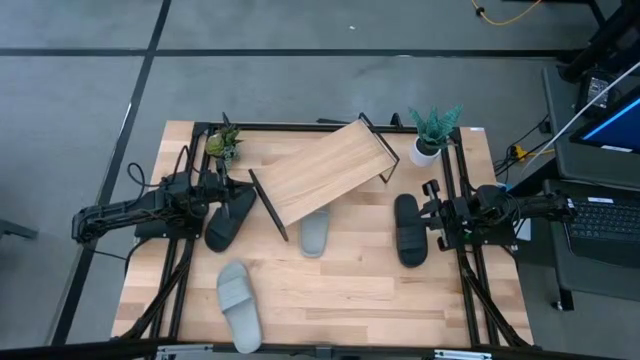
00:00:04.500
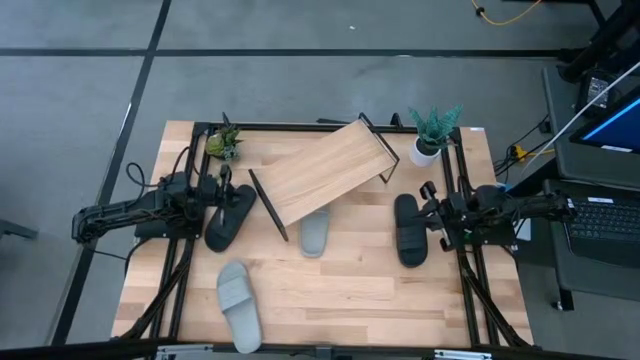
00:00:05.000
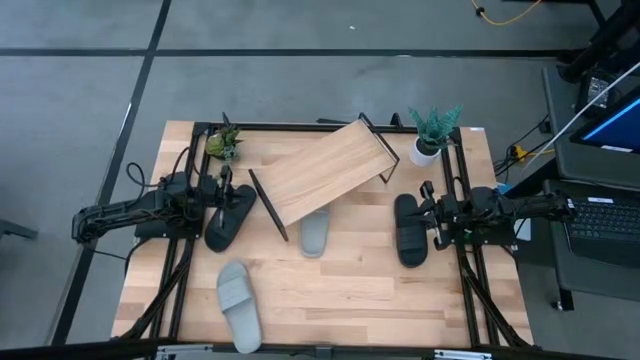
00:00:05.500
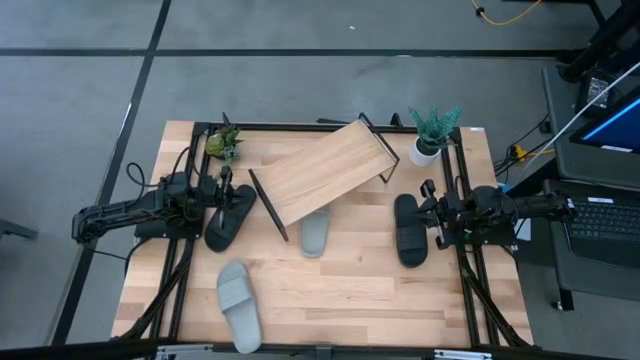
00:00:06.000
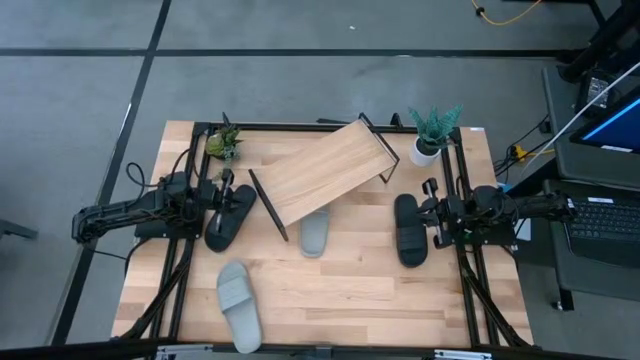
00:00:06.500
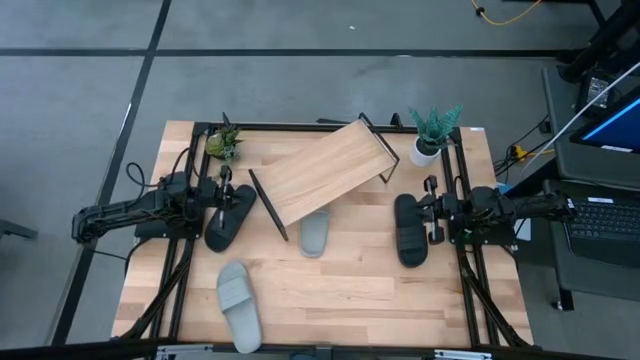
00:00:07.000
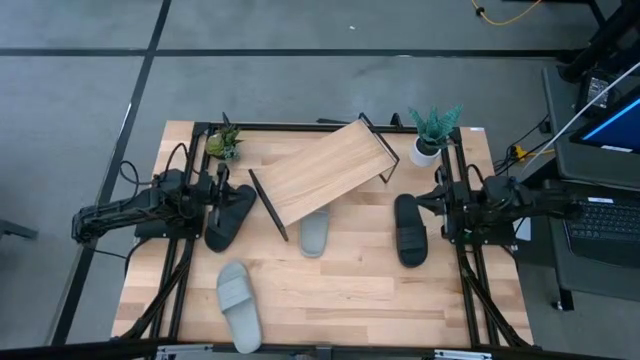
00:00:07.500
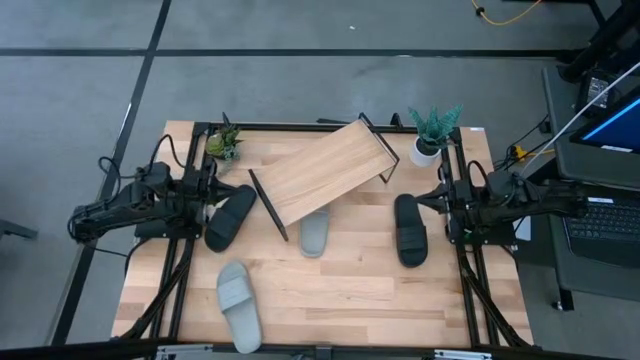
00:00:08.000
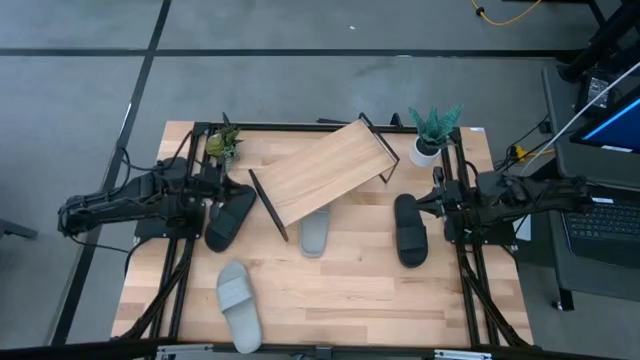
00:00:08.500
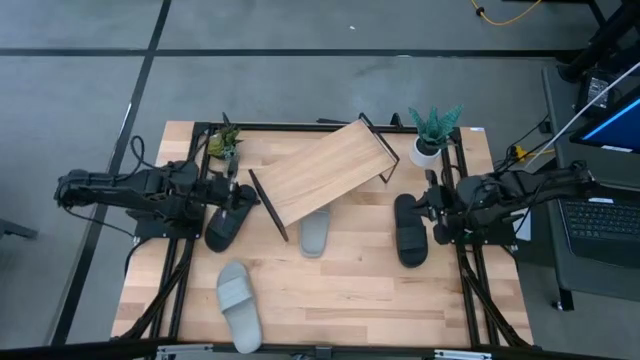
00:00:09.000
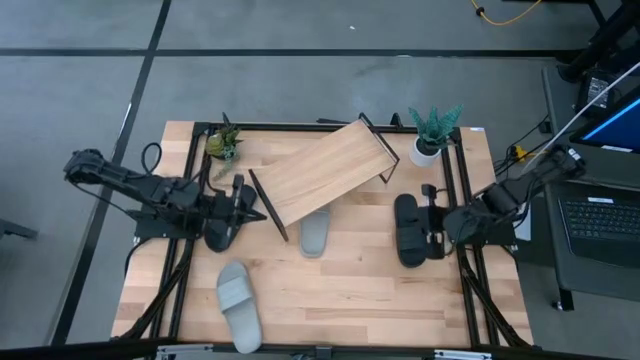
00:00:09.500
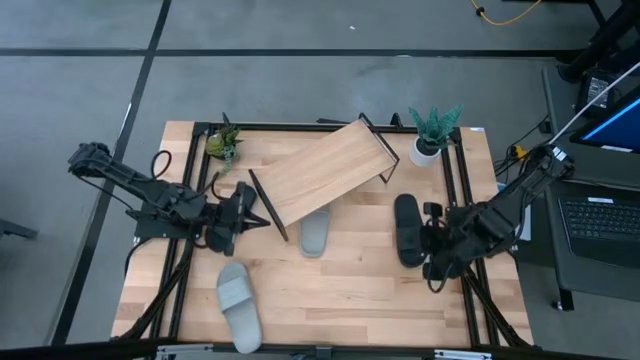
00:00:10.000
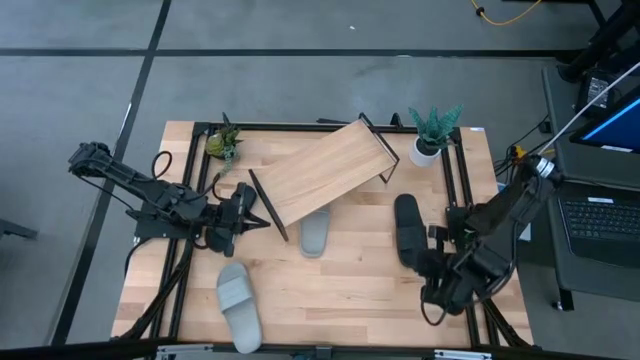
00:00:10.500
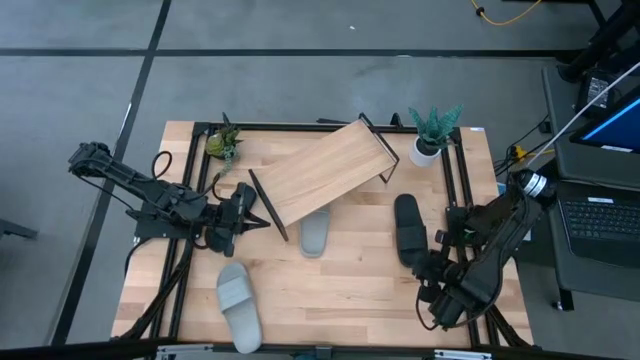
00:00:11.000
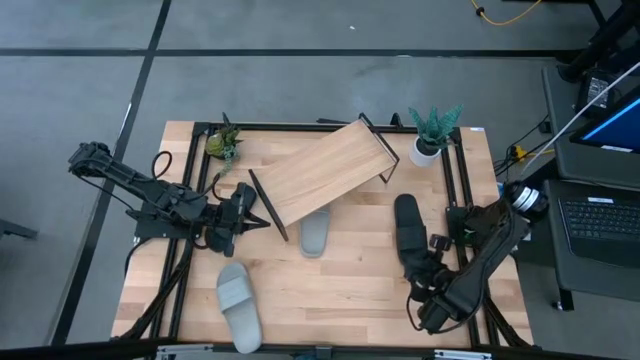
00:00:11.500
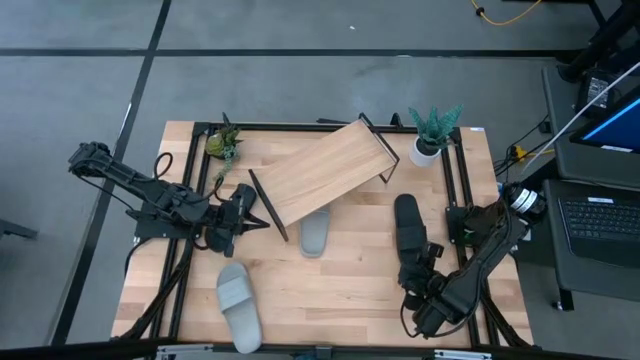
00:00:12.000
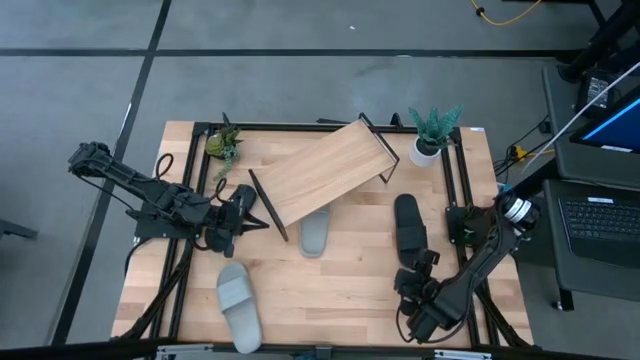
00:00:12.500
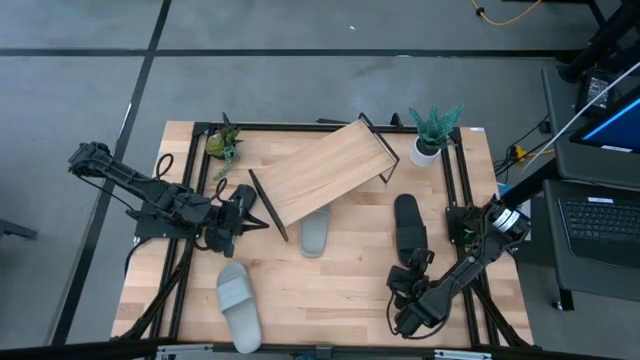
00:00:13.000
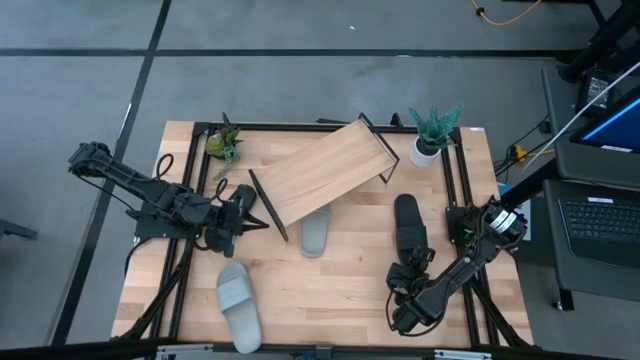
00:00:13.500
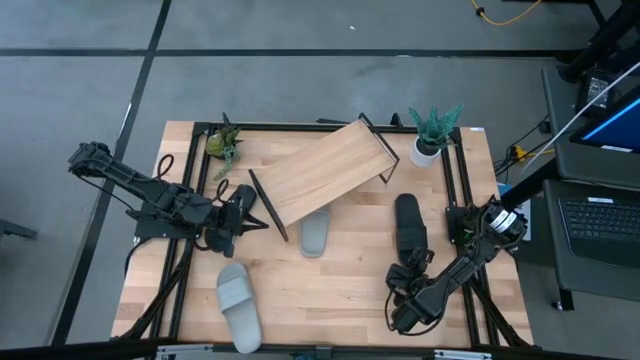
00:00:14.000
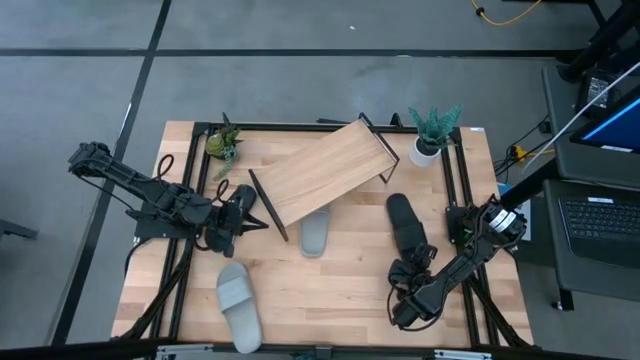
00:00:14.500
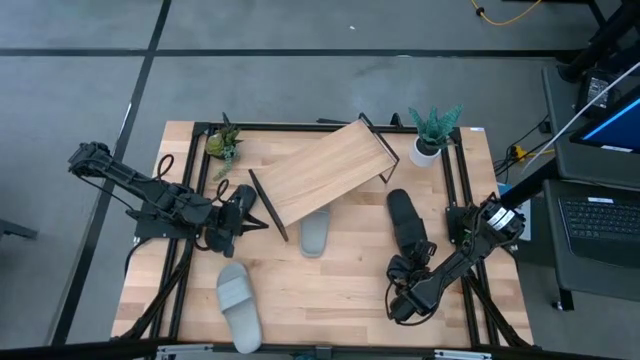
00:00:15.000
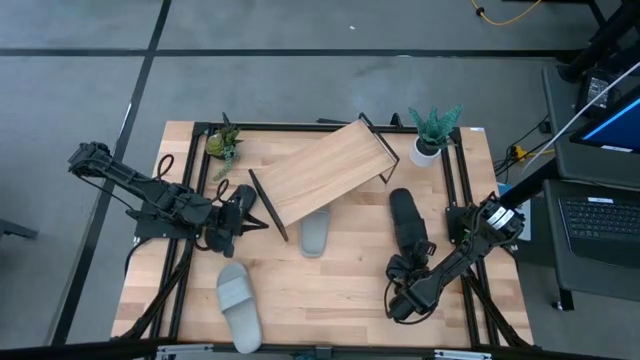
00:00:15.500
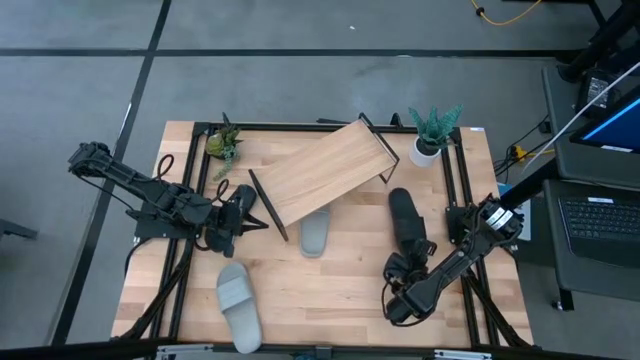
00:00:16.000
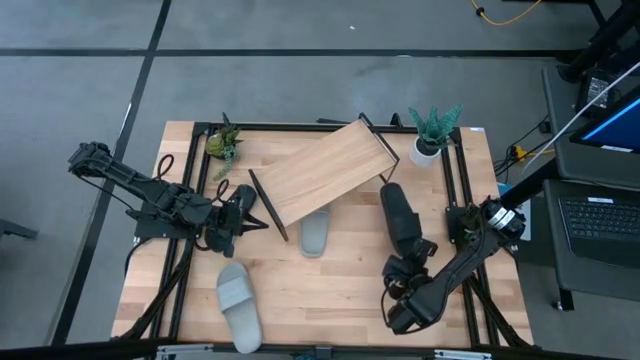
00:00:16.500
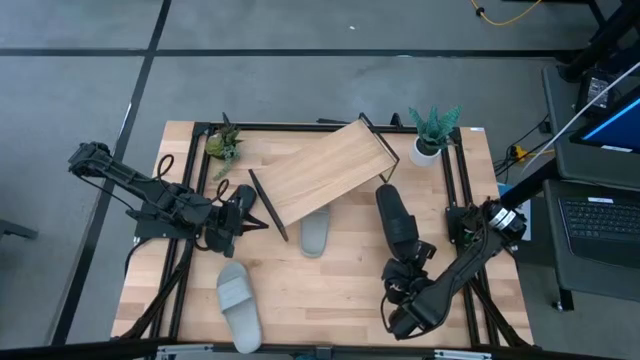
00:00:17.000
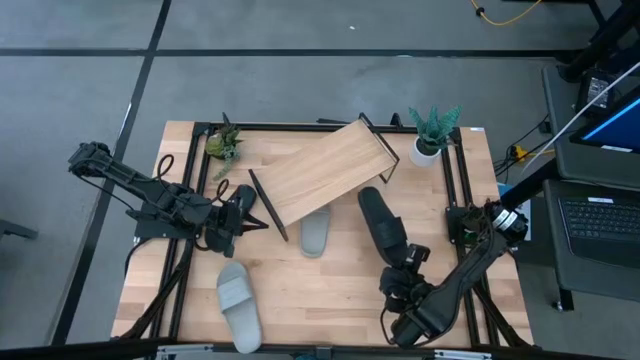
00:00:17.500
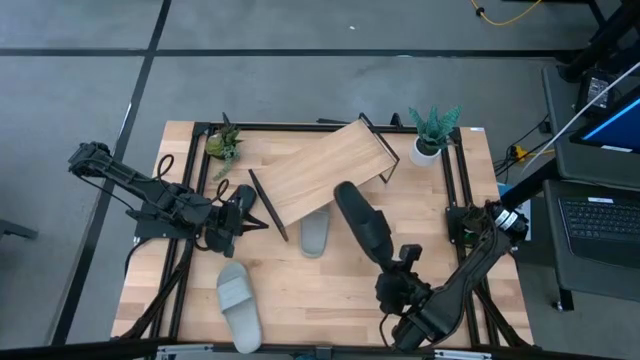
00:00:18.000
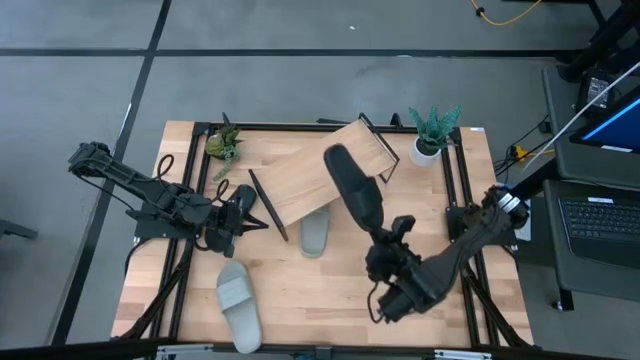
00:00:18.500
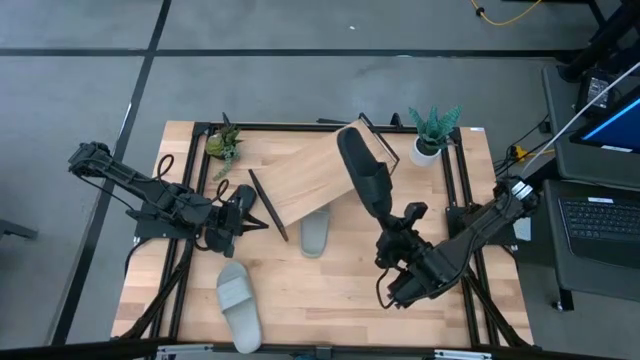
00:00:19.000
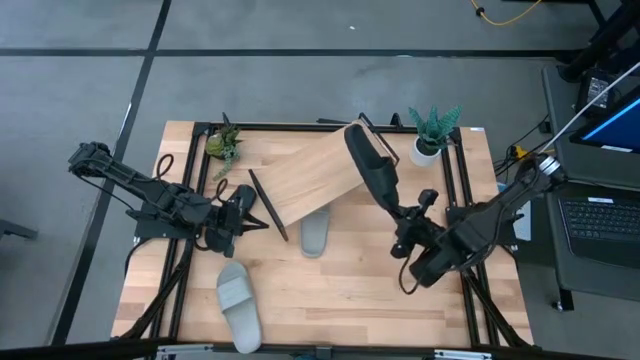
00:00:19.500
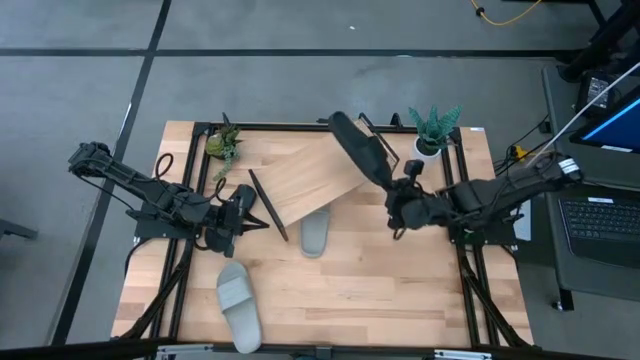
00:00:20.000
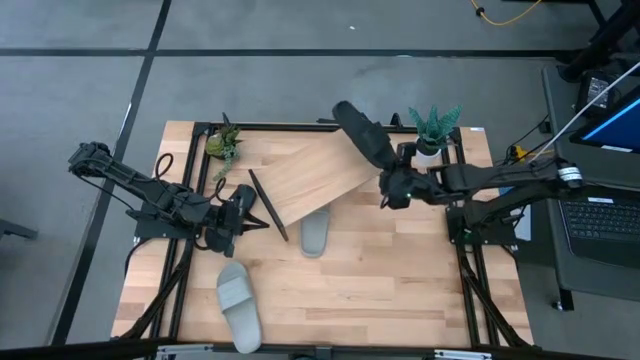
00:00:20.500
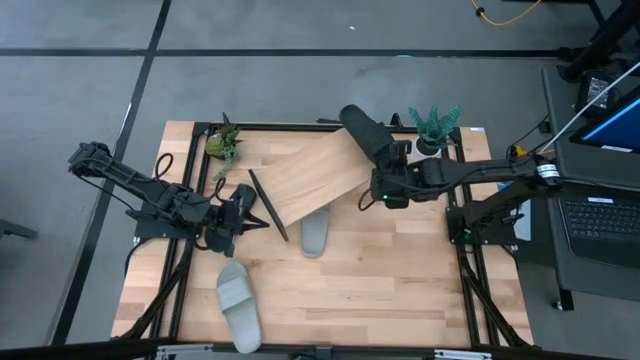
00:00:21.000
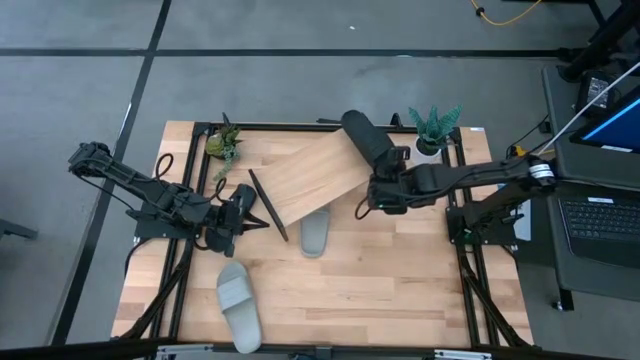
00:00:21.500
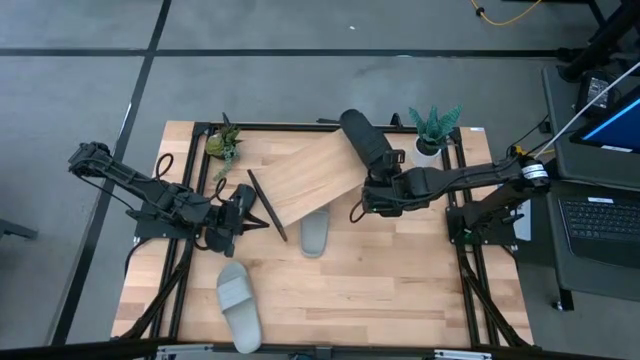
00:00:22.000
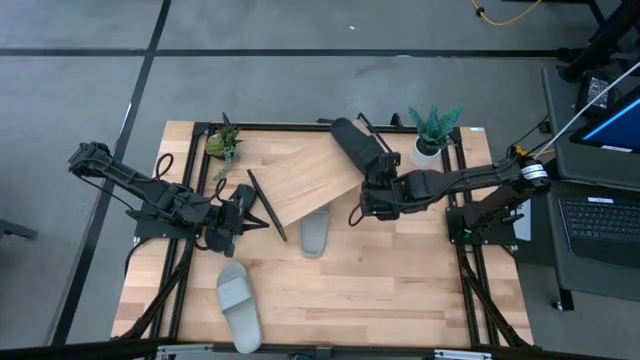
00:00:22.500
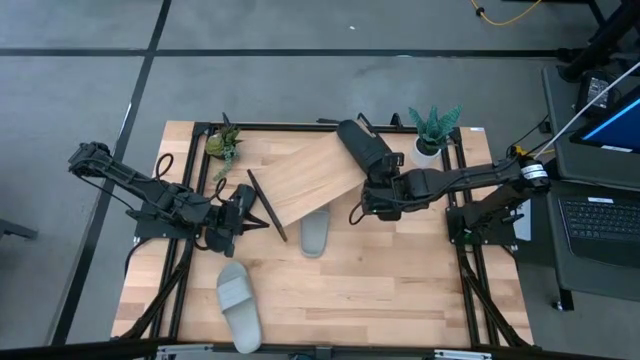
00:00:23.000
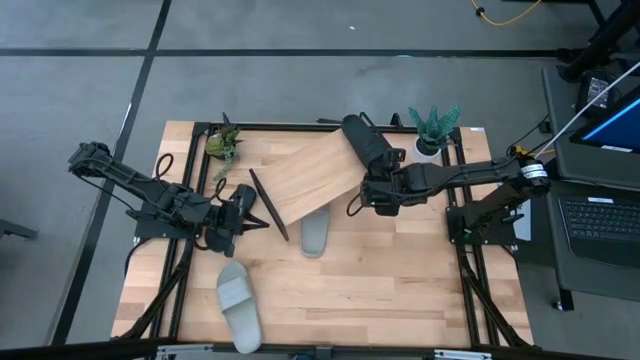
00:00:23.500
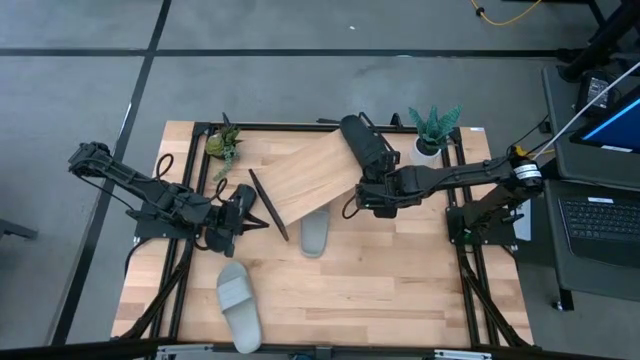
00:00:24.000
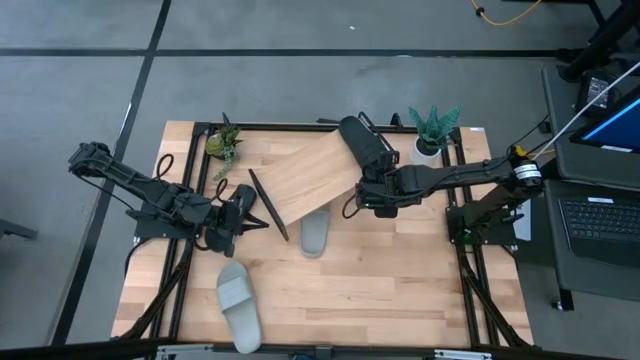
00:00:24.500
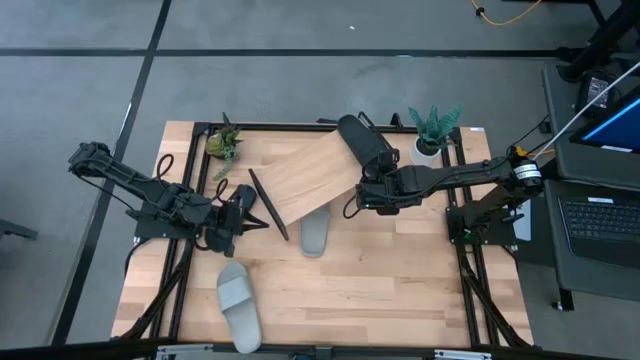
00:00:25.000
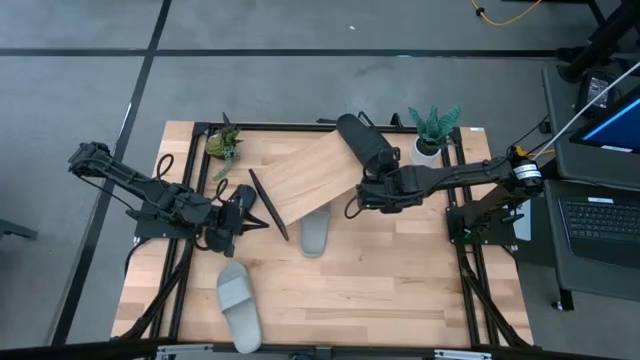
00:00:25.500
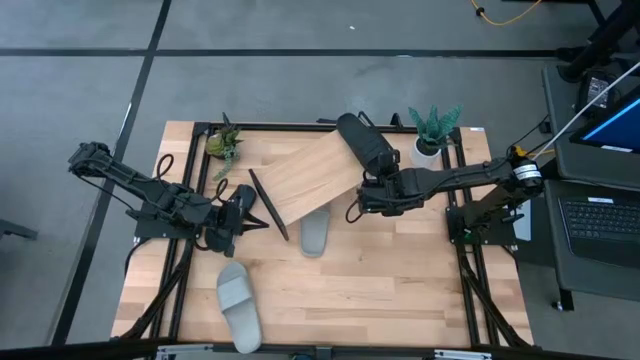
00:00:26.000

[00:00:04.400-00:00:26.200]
Task: Pick and place slides into the shelf
Put the right black slipper on the shelf
